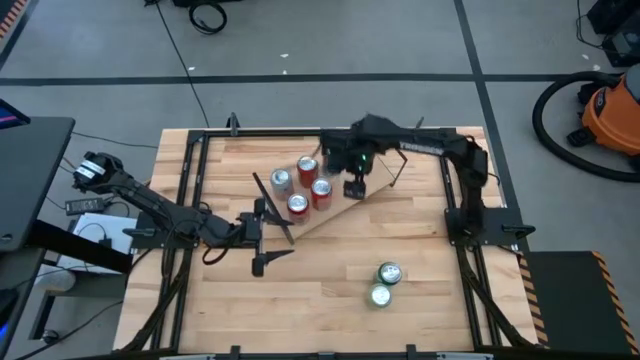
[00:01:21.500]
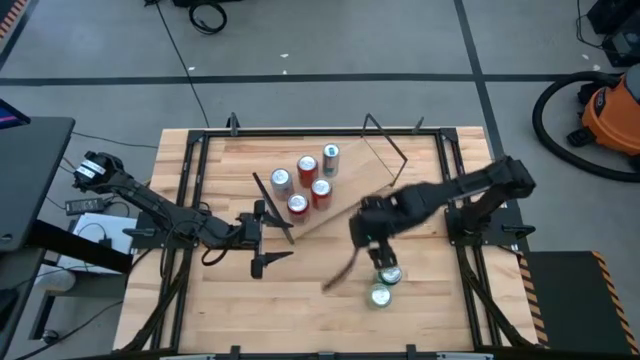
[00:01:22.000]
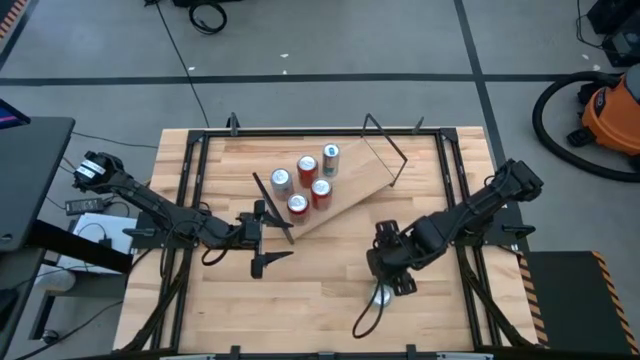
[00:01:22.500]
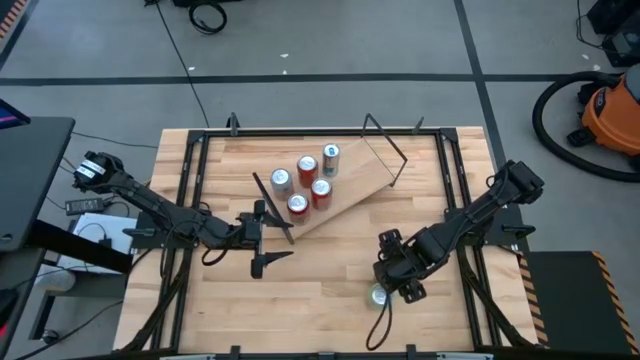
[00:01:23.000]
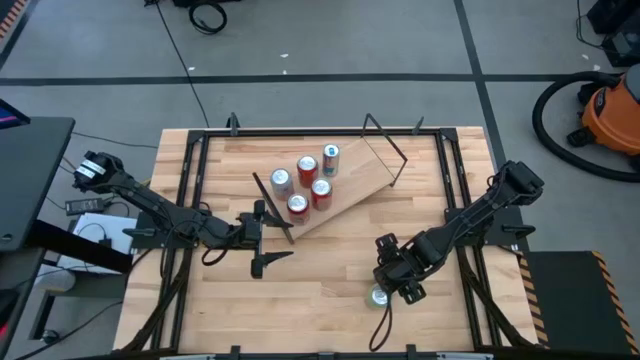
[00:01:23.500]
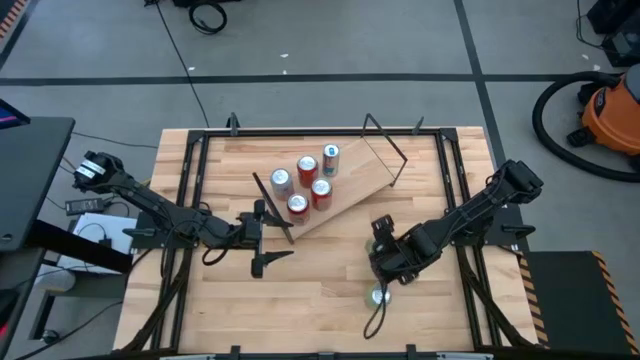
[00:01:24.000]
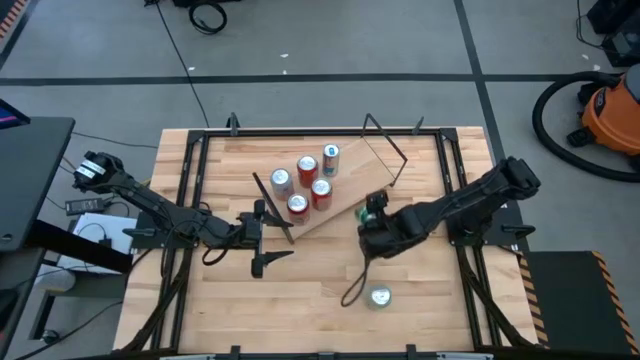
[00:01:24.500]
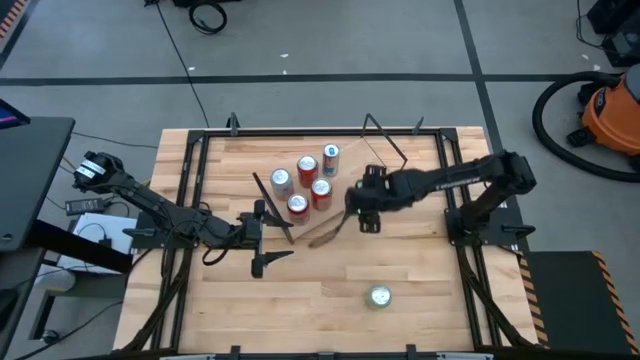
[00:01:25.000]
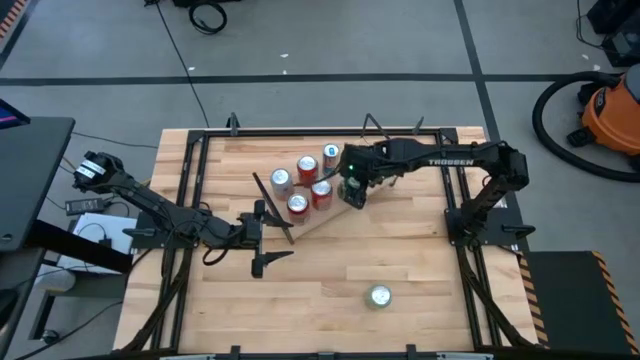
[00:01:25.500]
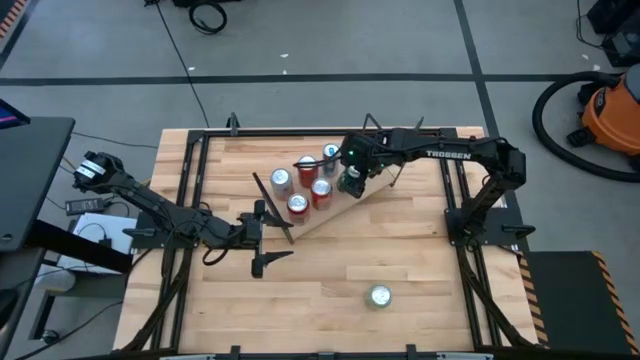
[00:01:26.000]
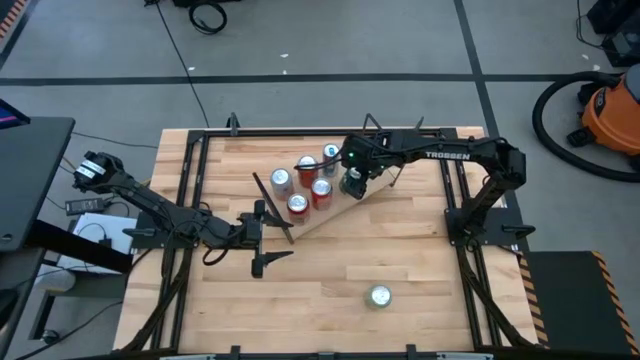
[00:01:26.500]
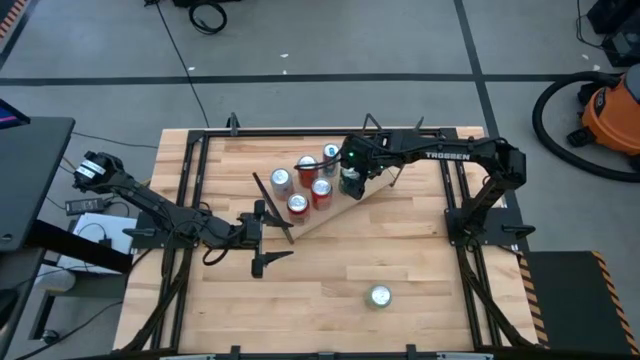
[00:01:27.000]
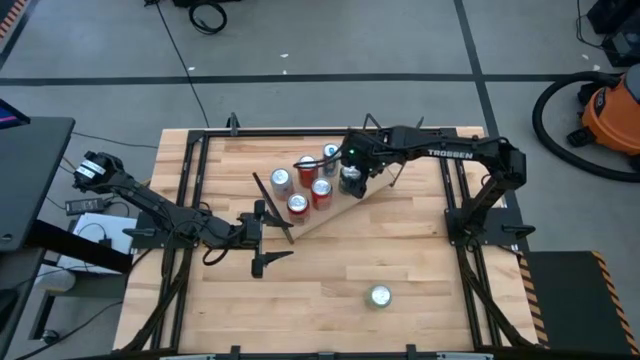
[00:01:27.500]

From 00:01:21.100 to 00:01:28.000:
Task: Place canned beverage on shelf
Put the green soda can on the shelf

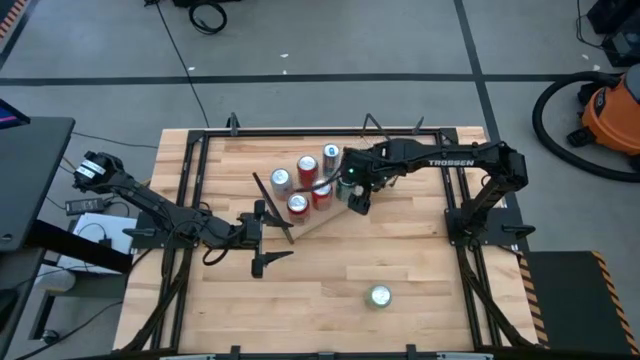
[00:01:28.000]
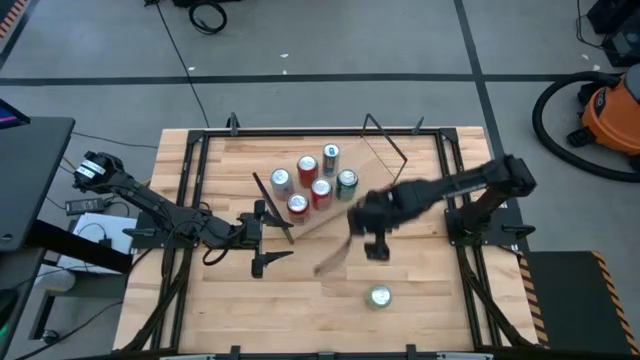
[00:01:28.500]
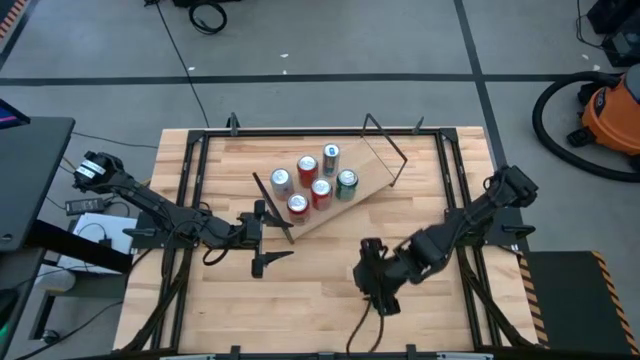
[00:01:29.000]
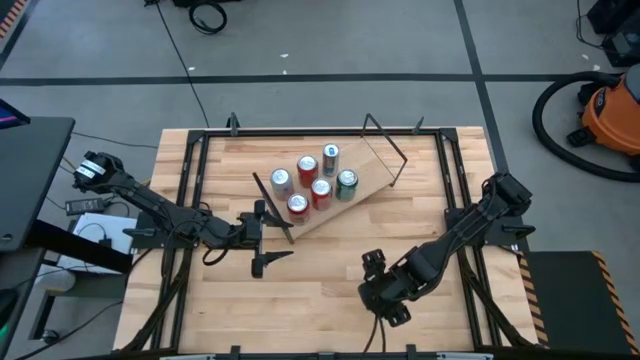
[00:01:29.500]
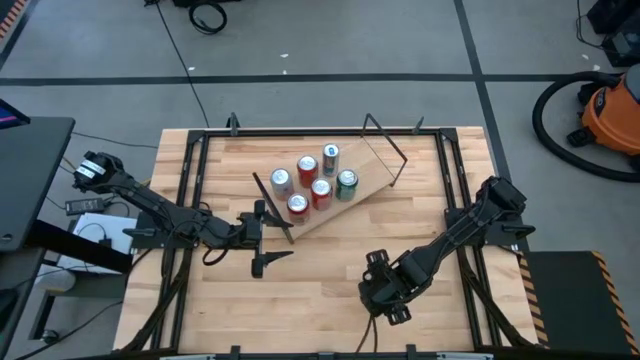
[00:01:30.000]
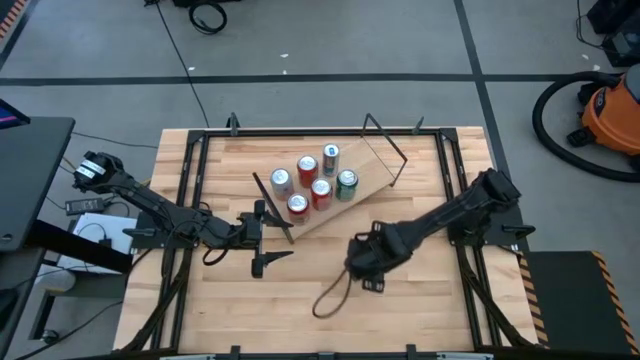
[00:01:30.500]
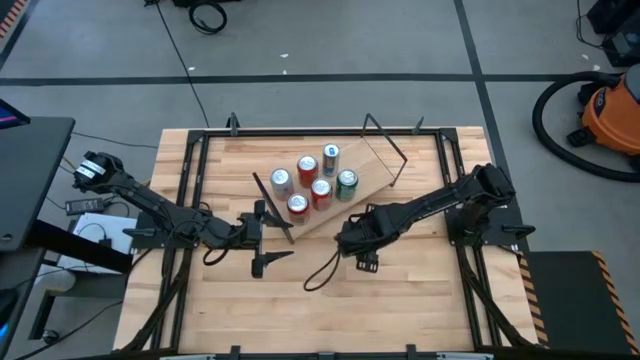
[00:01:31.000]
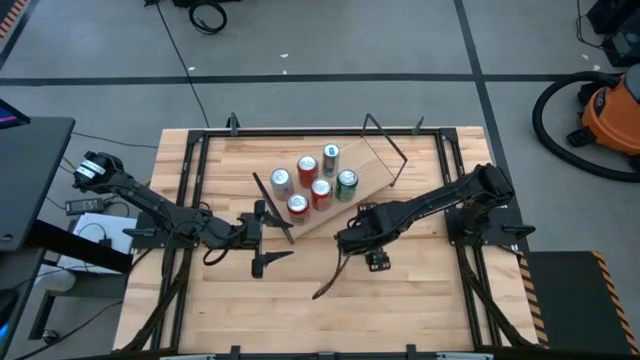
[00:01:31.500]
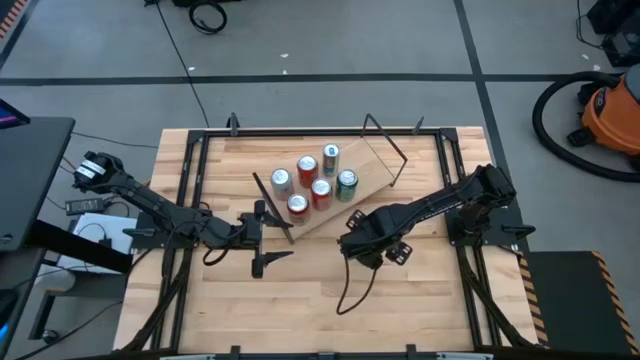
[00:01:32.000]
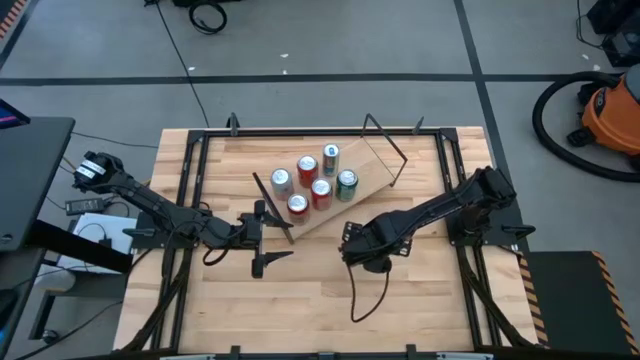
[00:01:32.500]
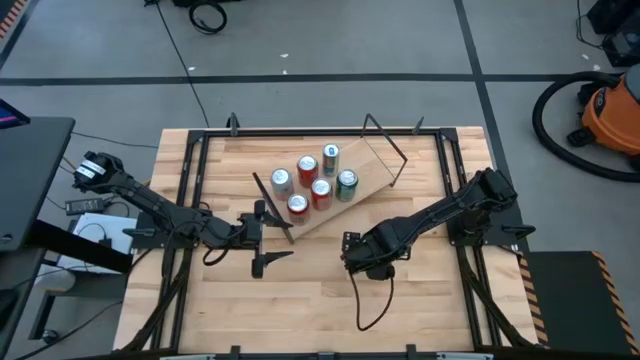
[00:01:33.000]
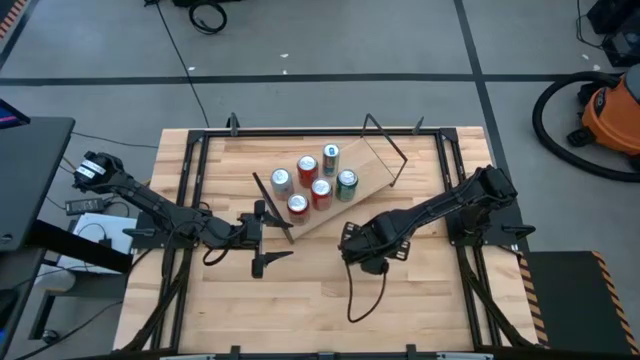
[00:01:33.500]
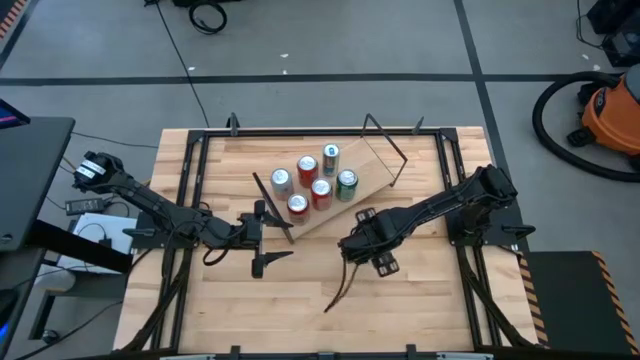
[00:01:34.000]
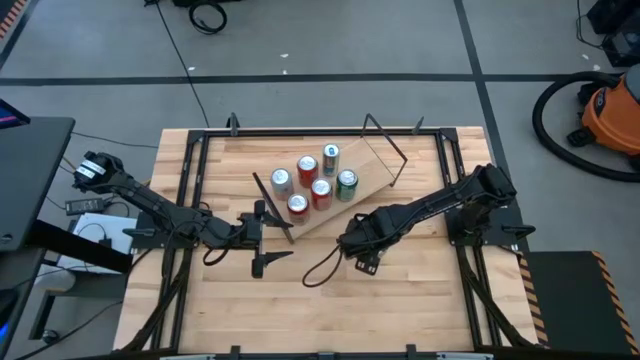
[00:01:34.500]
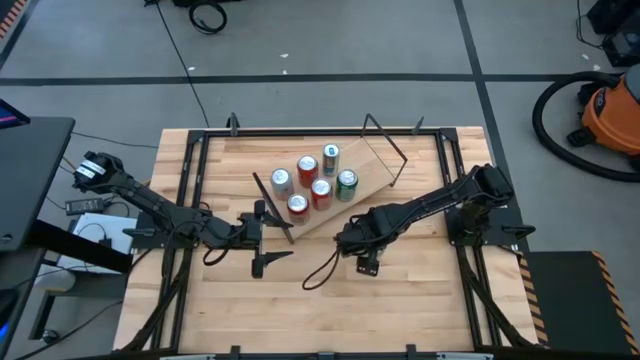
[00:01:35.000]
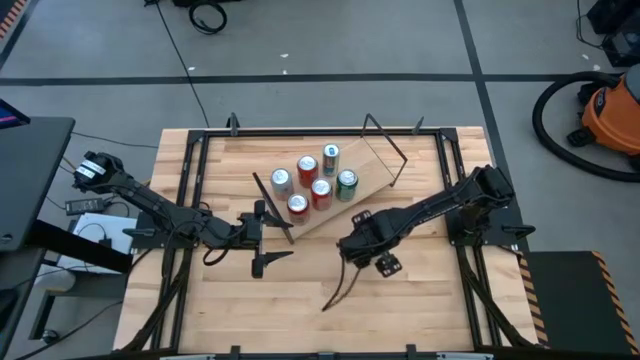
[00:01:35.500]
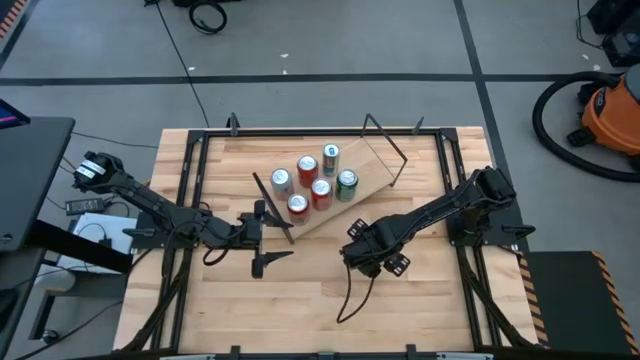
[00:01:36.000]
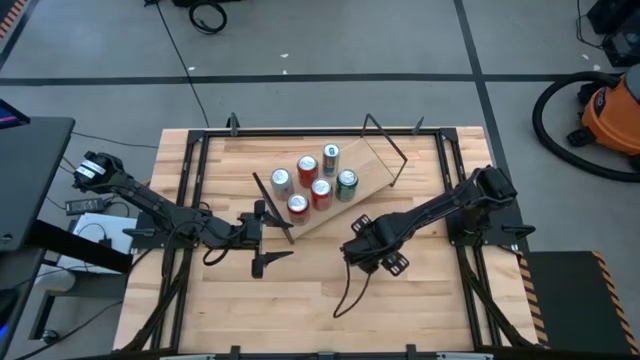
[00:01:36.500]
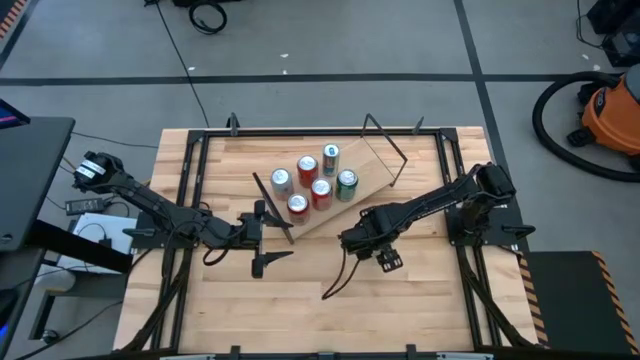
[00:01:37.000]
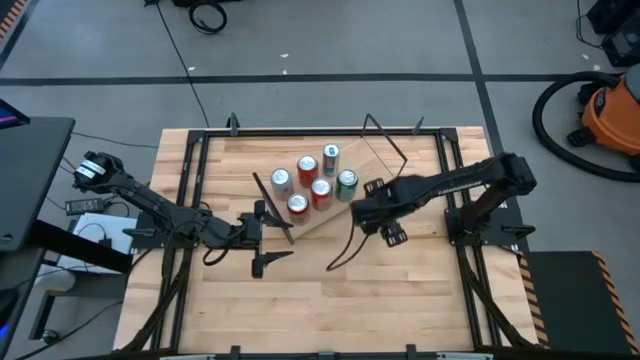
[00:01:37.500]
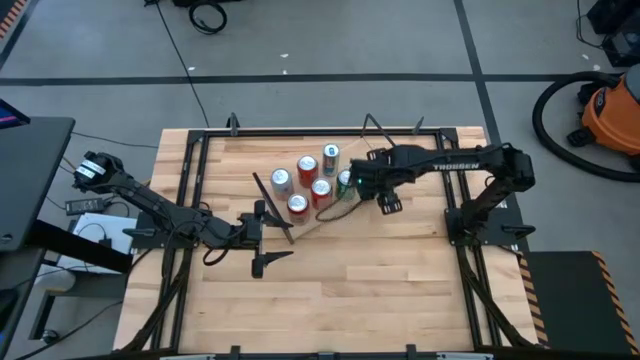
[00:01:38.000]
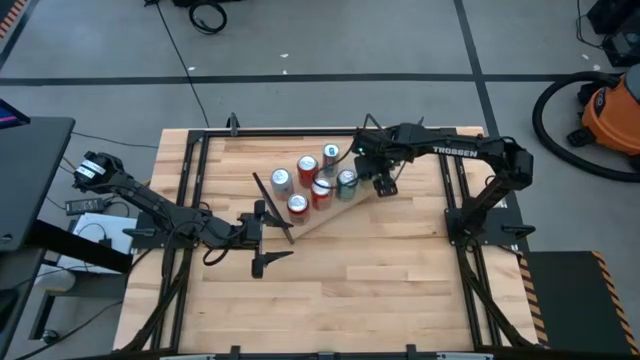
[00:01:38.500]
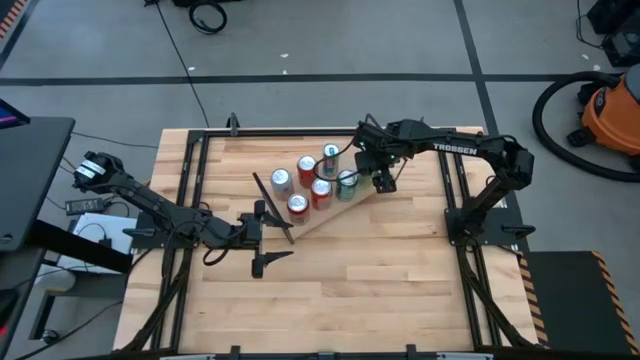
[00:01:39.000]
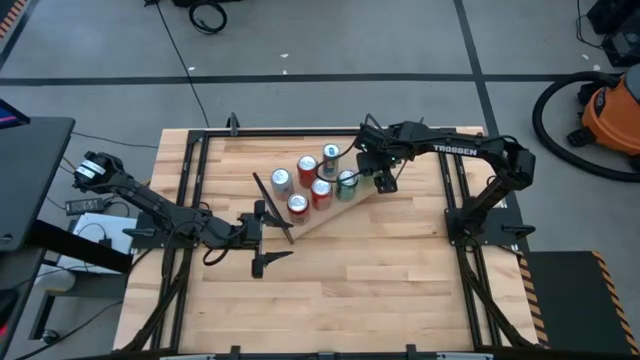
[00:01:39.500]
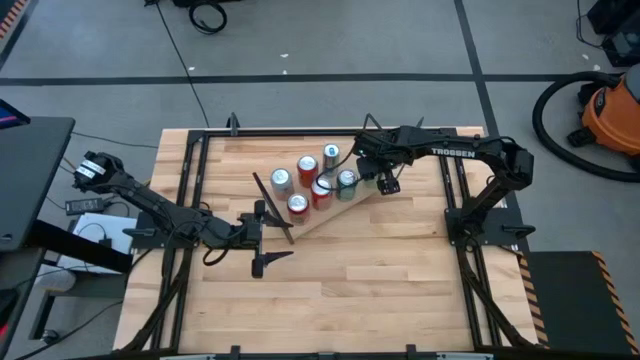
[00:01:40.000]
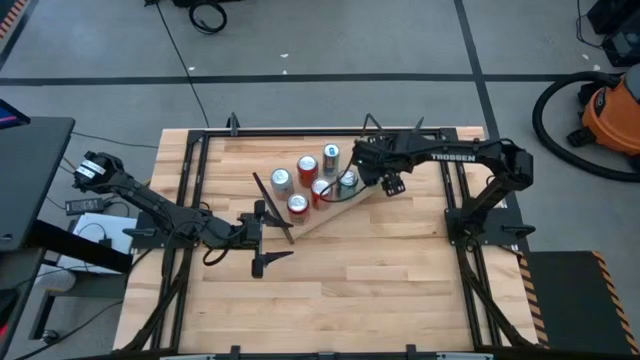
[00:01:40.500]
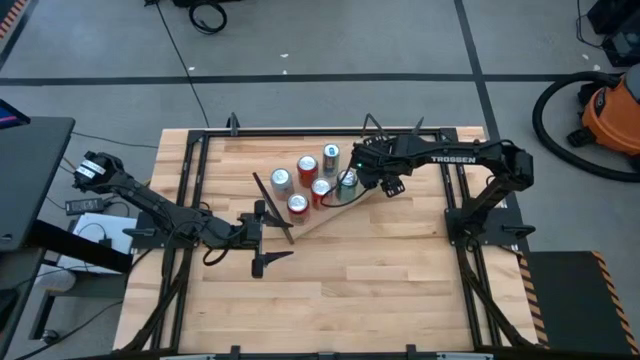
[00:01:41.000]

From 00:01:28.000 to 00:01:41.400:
Put the light green soda can on the shelf
